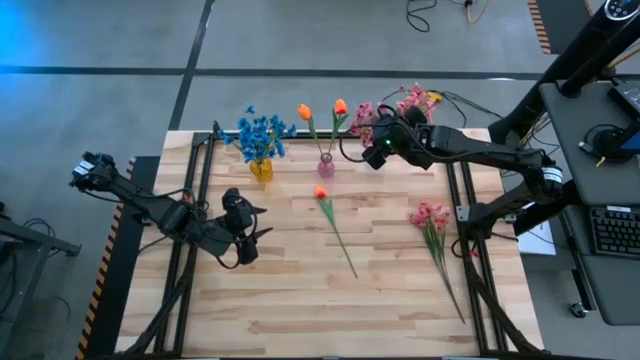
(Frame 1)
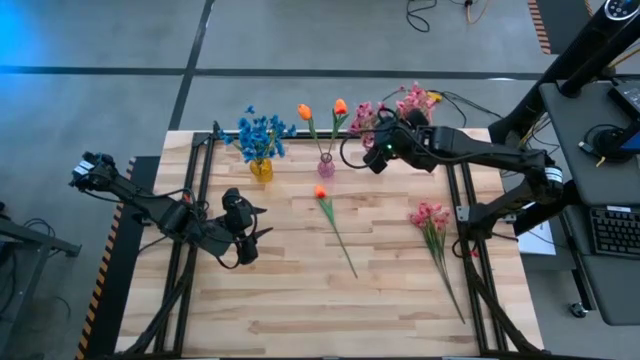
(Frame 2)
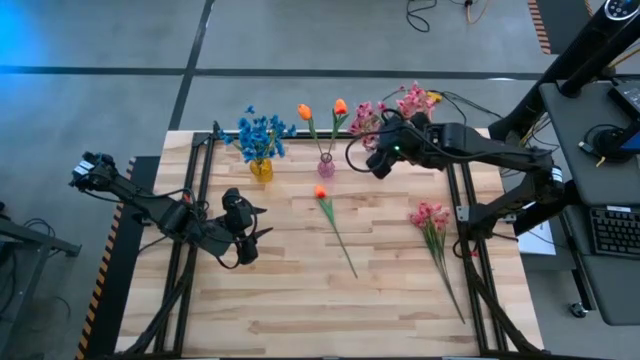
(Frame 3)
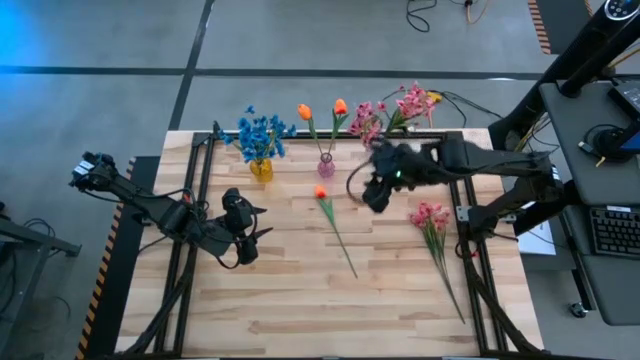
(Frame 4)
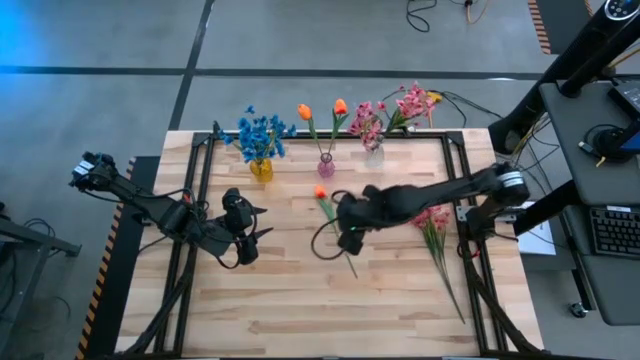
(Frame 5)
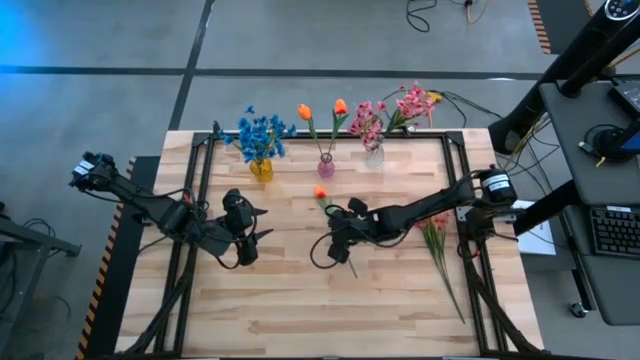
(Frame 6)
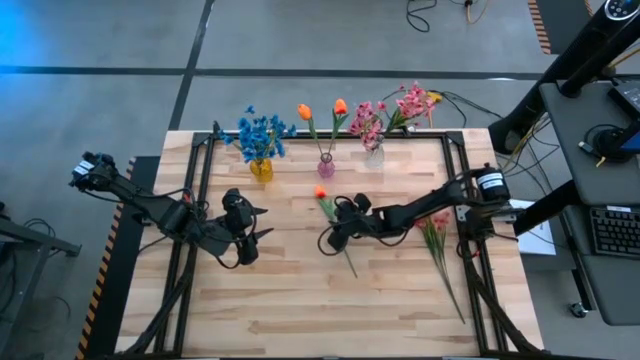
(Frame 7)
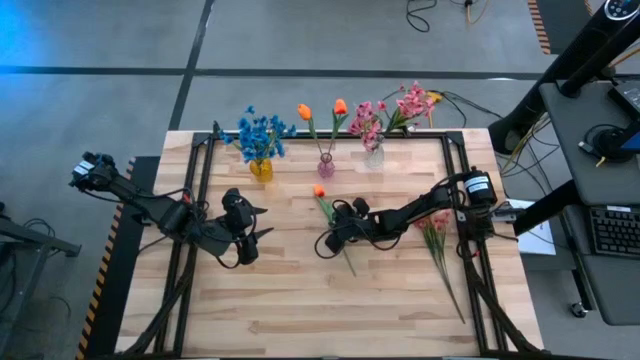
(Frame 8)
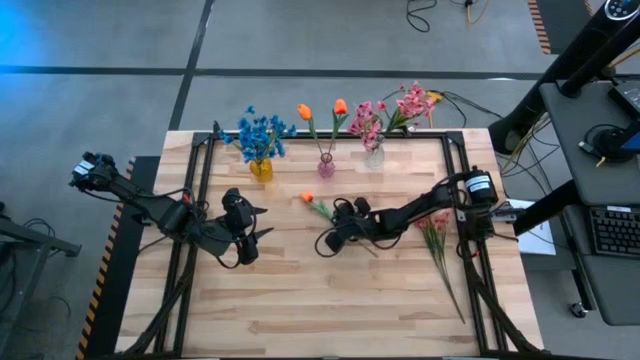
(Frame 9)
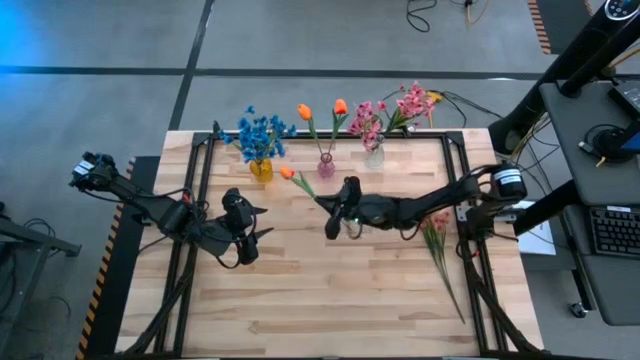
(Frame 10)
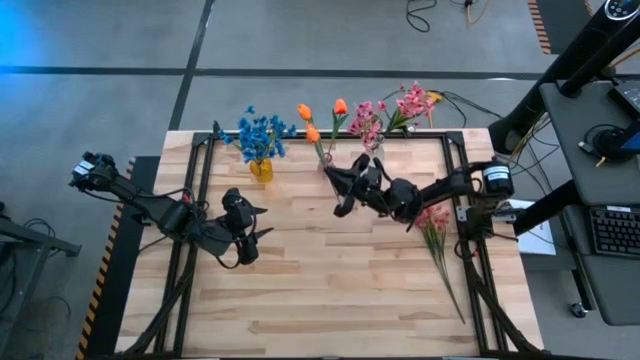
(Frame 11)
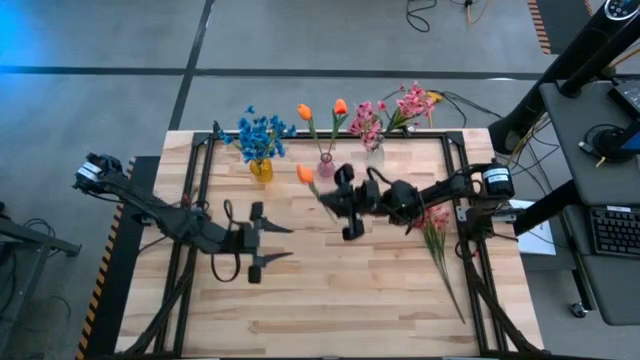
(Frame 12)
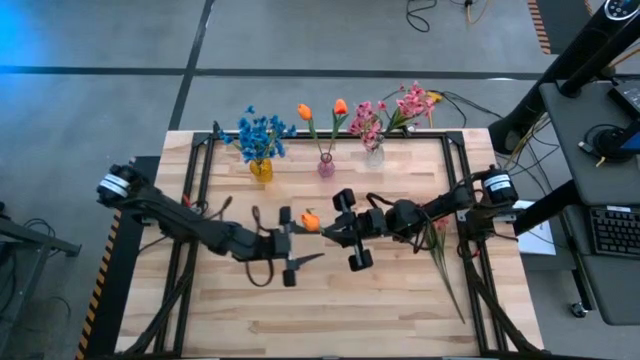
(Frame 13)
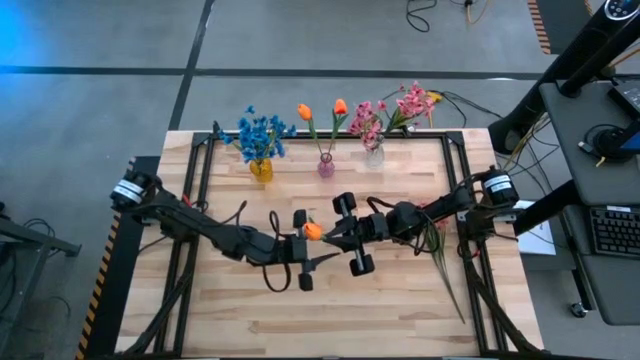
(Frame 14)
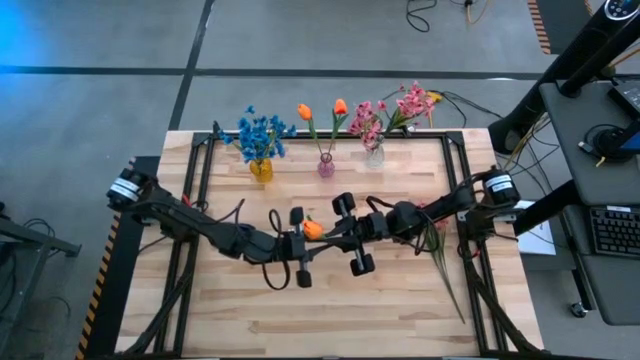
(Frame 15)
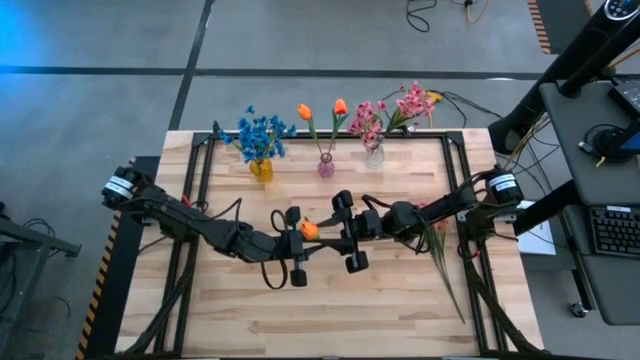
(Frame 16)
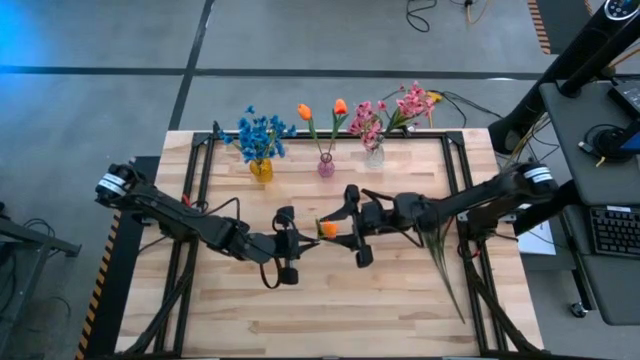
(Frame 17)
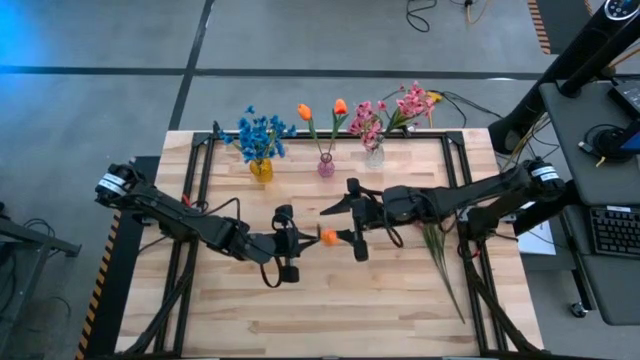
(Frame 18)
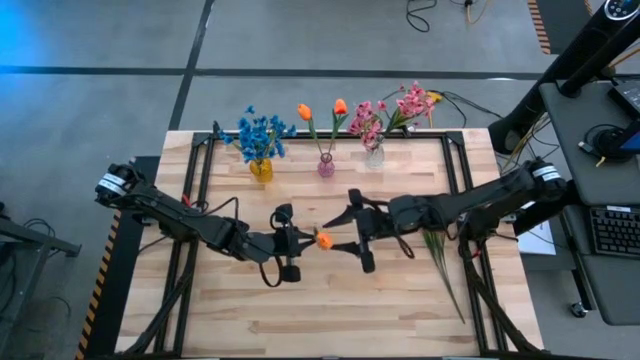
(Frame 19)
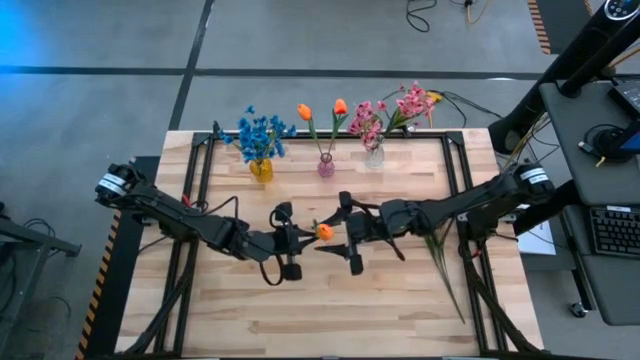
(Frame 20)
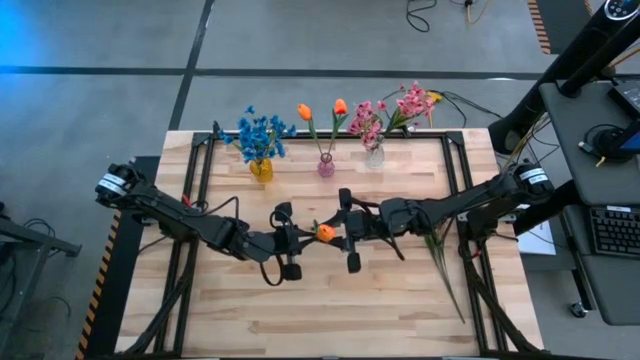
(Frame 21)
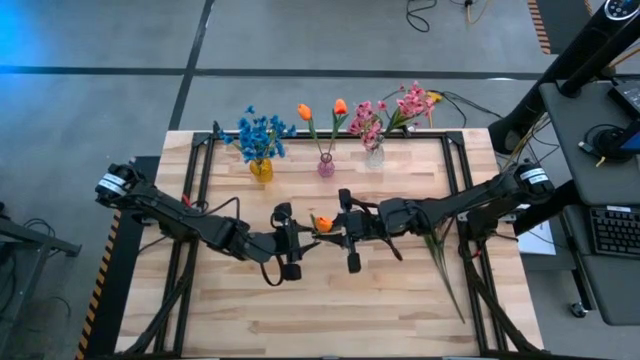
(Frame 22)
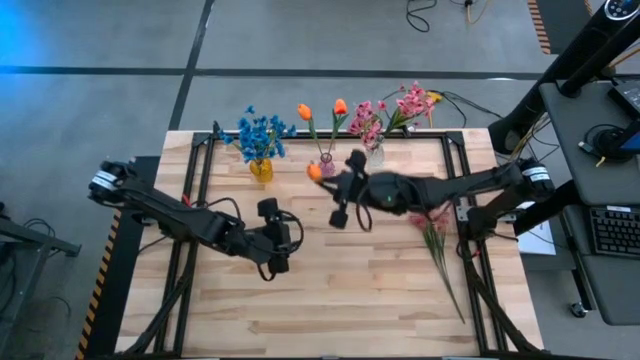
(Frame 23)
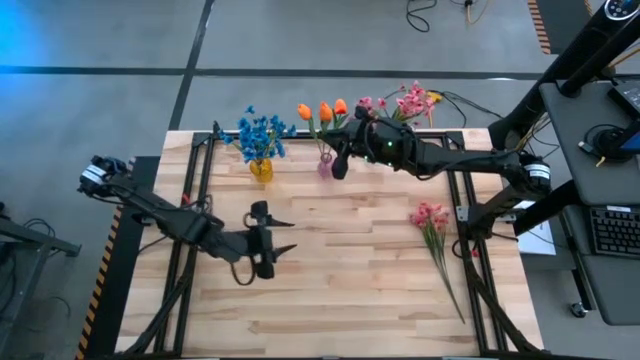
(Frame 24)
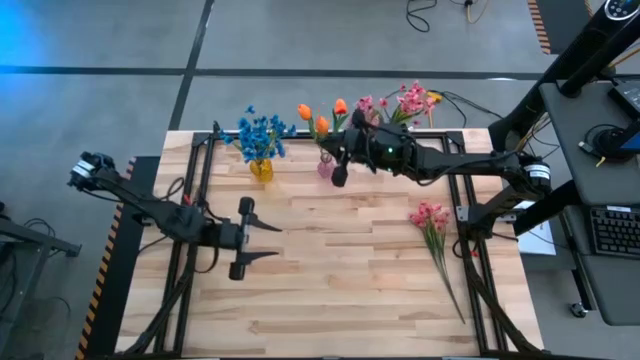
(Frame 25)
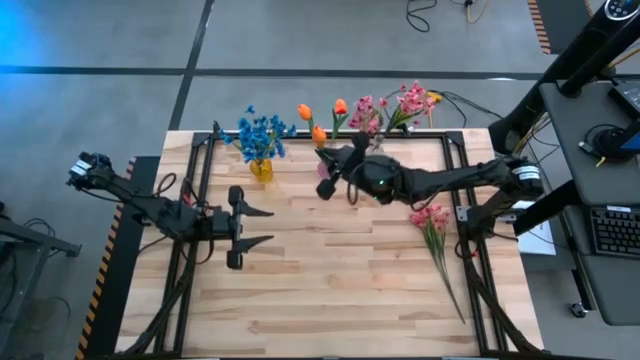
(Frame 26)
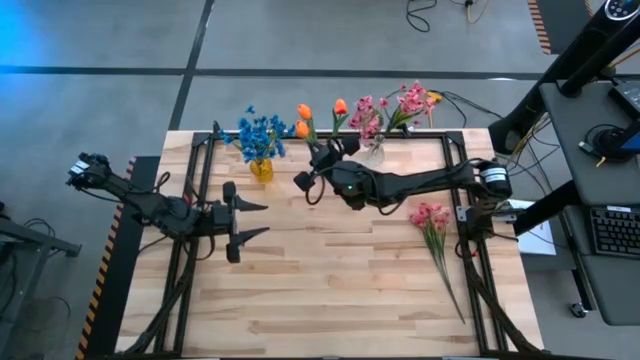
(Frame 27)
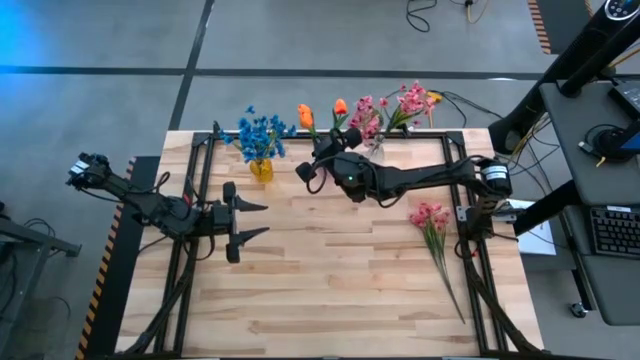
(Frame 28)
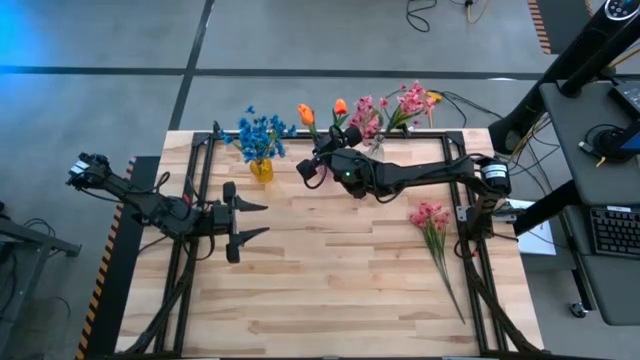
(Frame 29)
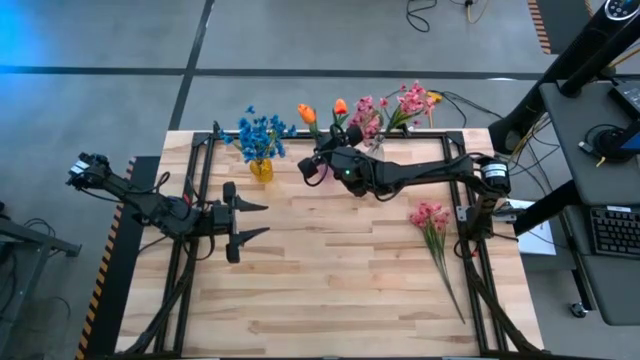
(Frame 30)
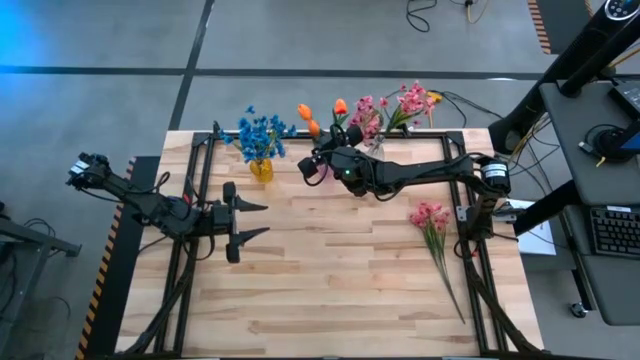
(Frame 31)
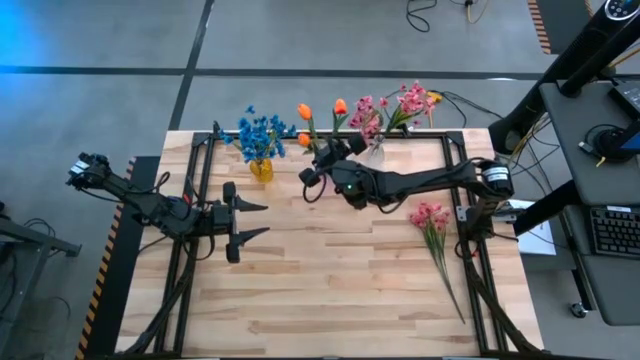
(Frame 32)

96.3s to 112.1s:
Task: Sort flowers into vase by color
Put the orange flower into the violet vase
